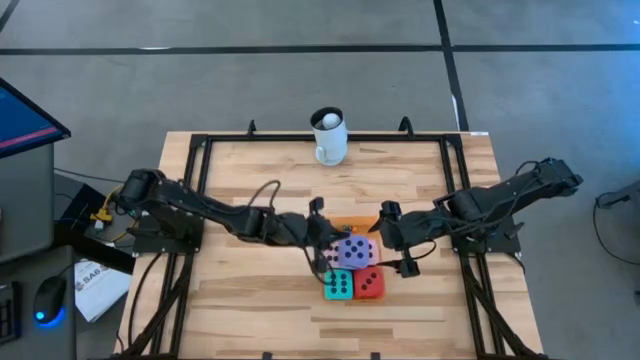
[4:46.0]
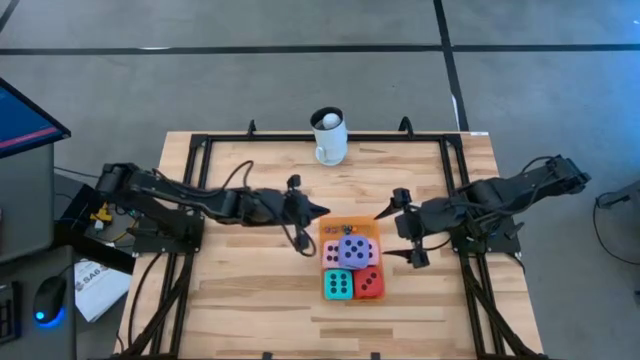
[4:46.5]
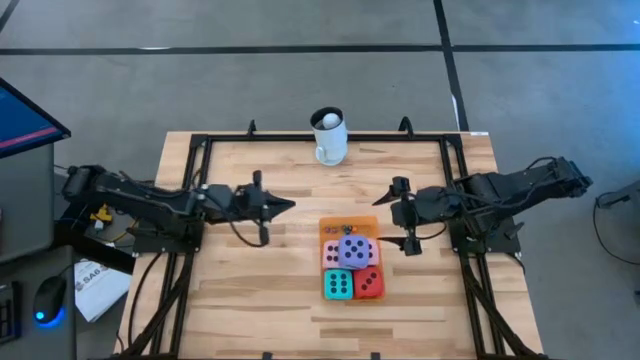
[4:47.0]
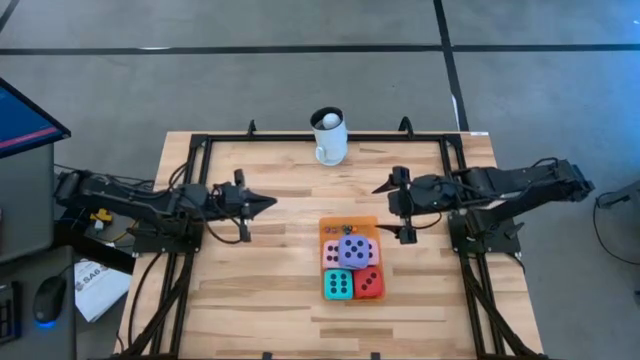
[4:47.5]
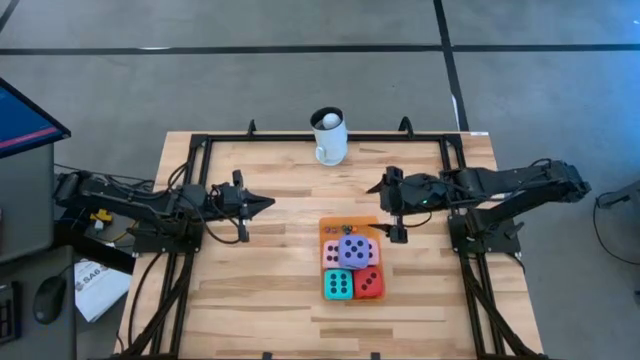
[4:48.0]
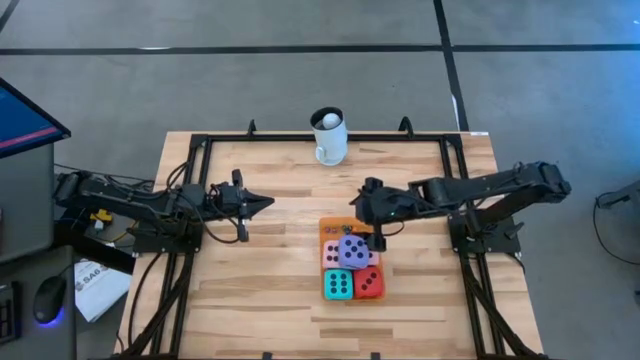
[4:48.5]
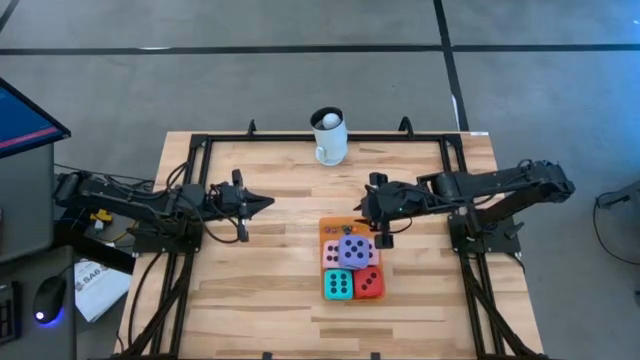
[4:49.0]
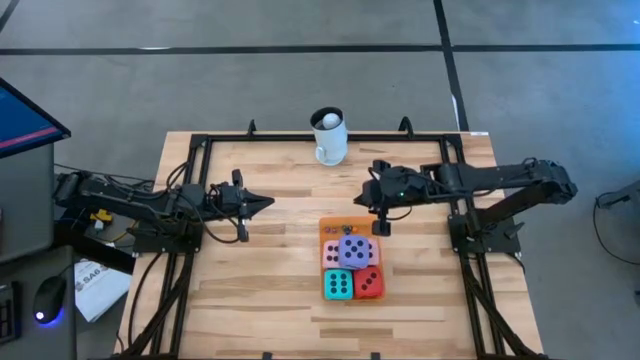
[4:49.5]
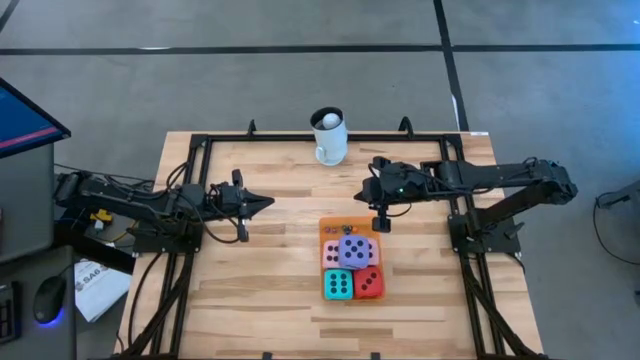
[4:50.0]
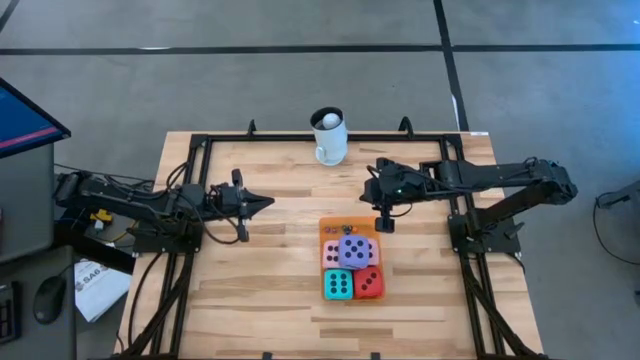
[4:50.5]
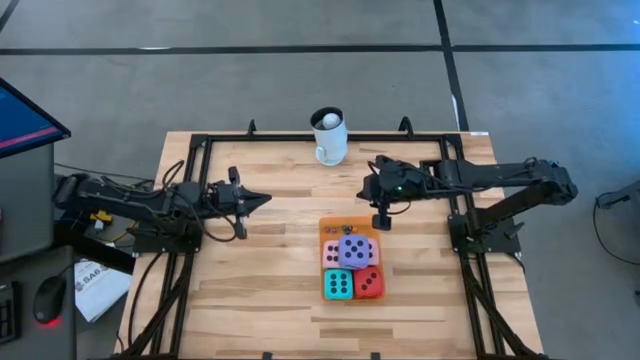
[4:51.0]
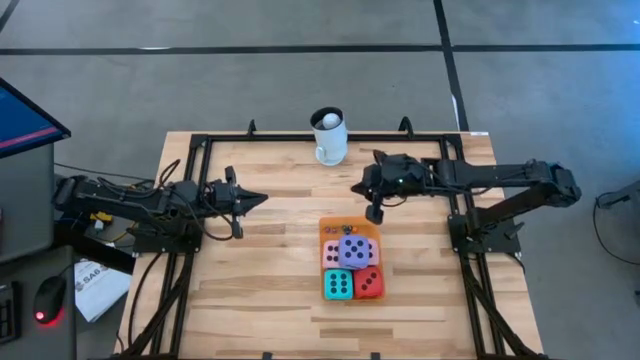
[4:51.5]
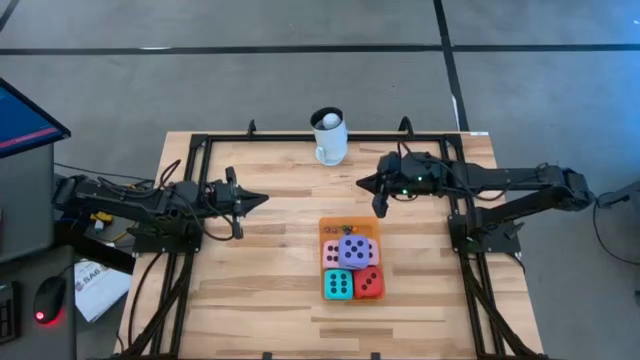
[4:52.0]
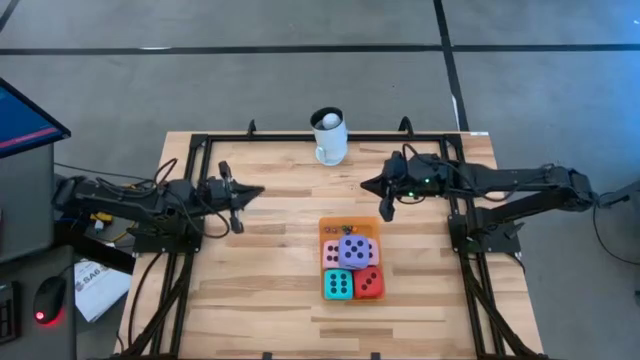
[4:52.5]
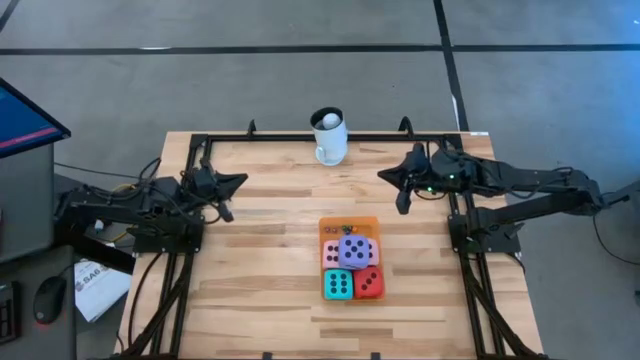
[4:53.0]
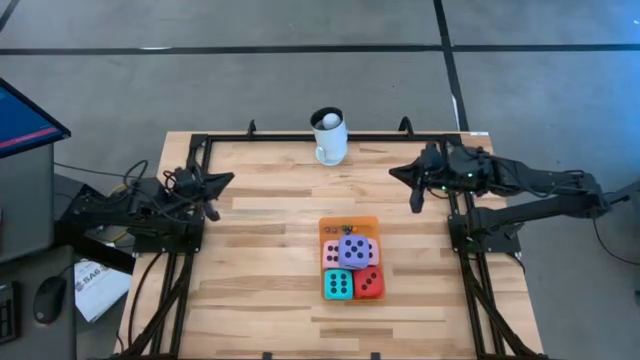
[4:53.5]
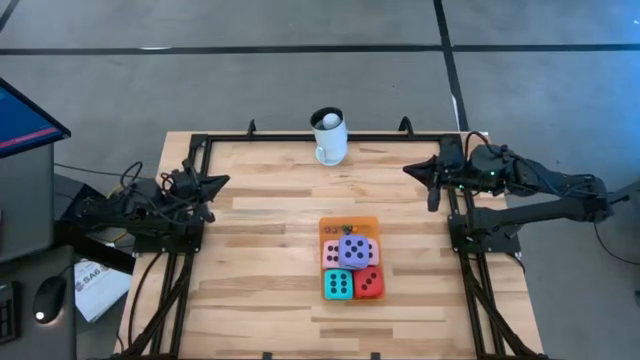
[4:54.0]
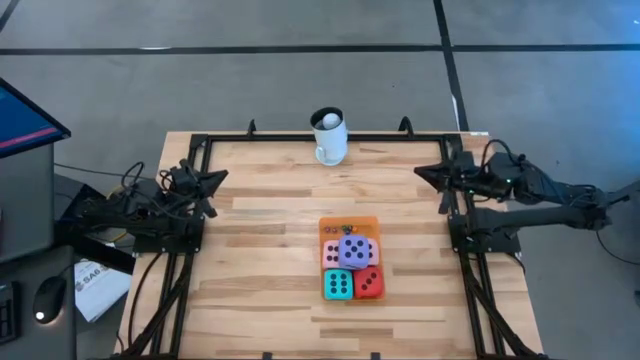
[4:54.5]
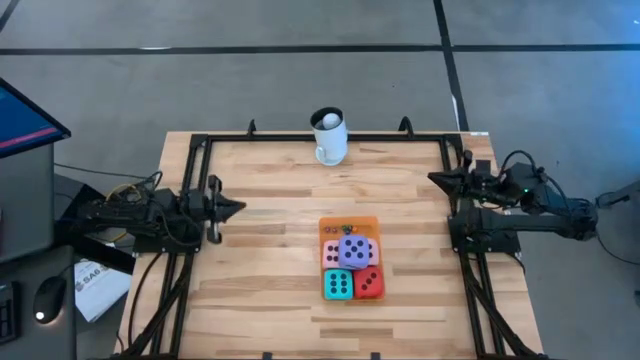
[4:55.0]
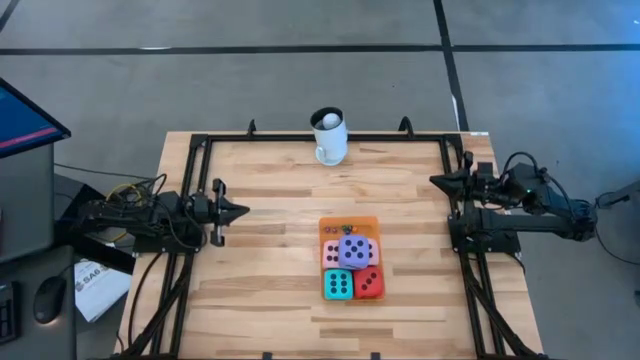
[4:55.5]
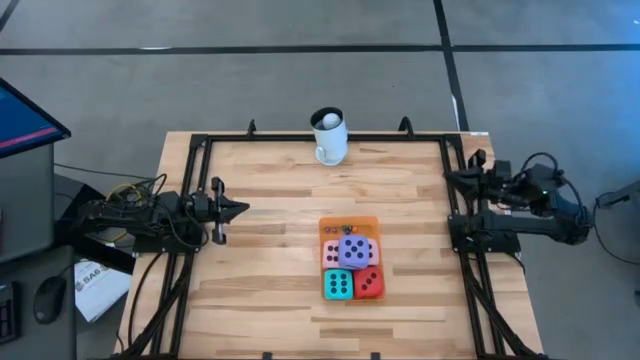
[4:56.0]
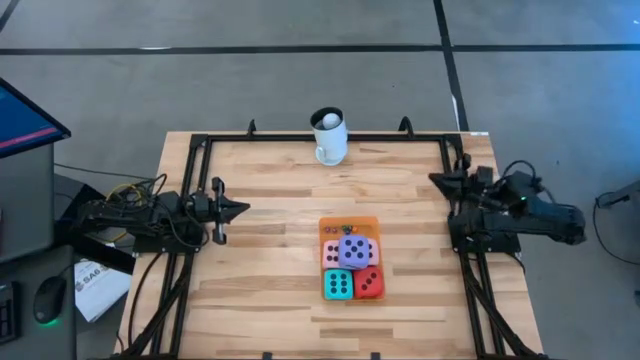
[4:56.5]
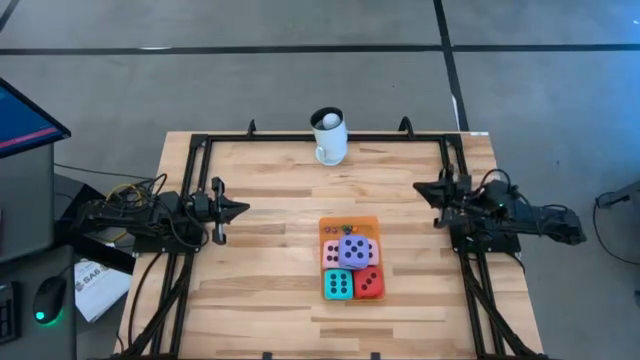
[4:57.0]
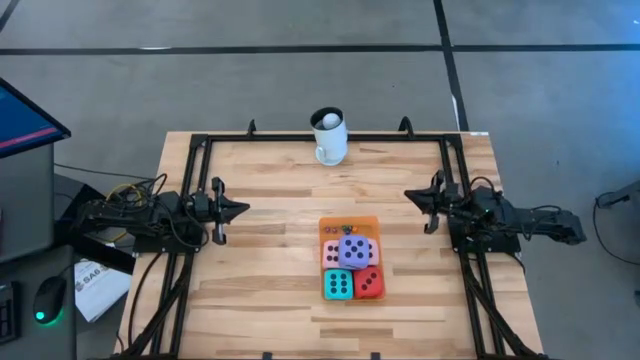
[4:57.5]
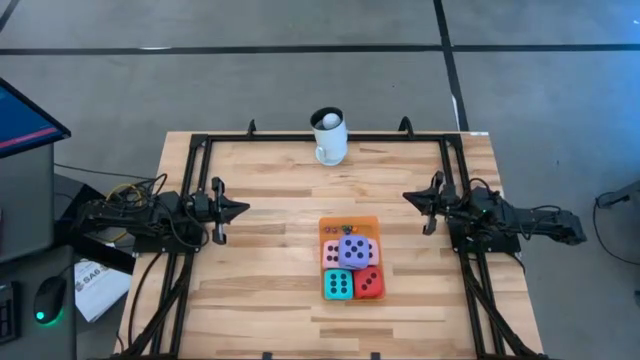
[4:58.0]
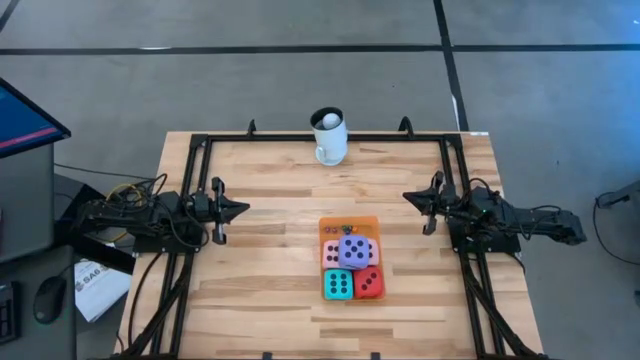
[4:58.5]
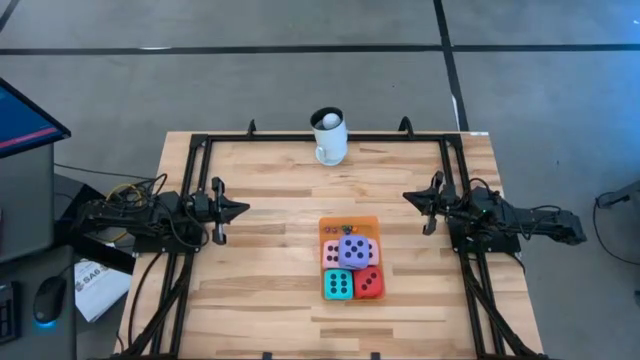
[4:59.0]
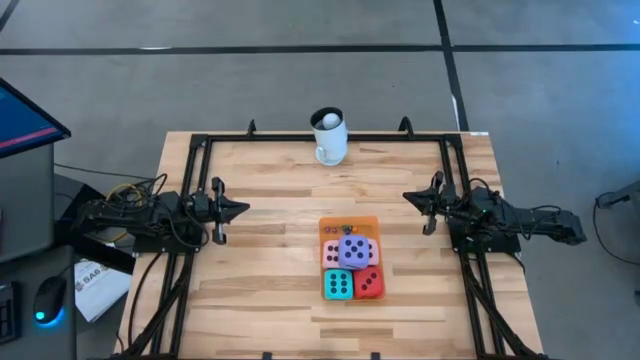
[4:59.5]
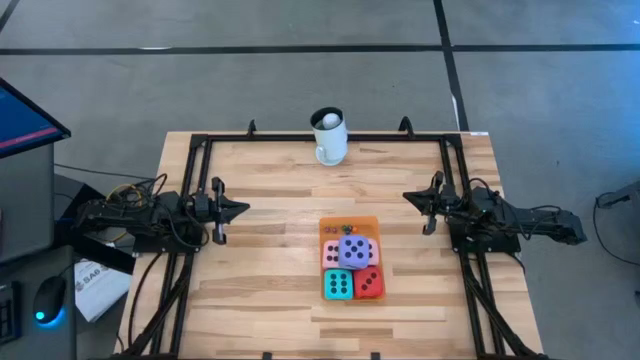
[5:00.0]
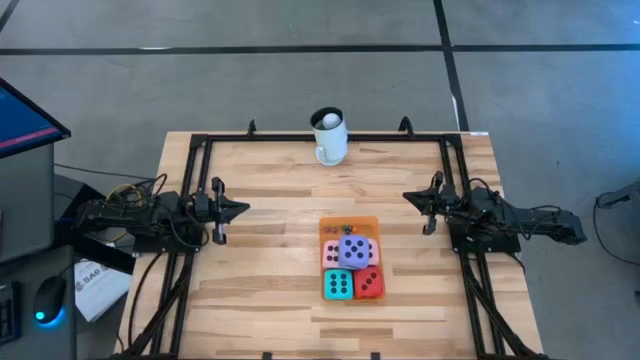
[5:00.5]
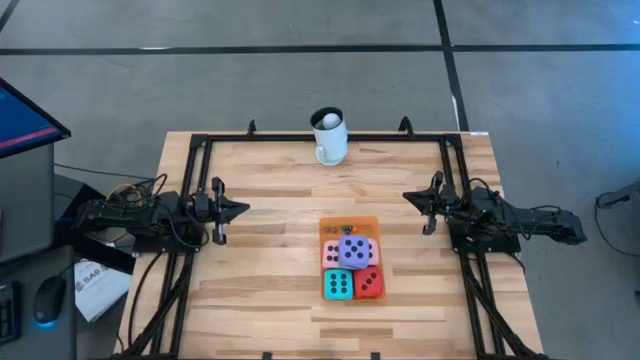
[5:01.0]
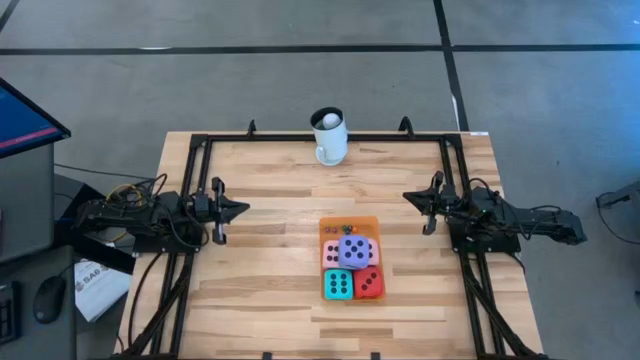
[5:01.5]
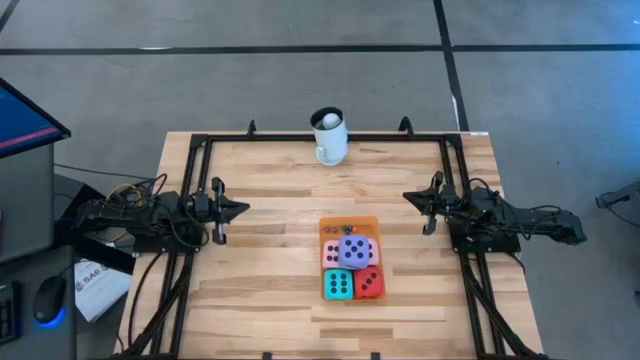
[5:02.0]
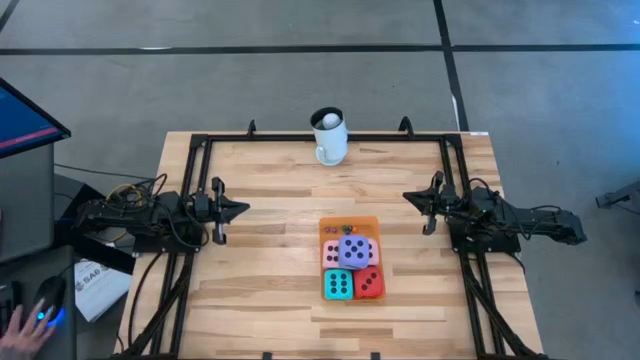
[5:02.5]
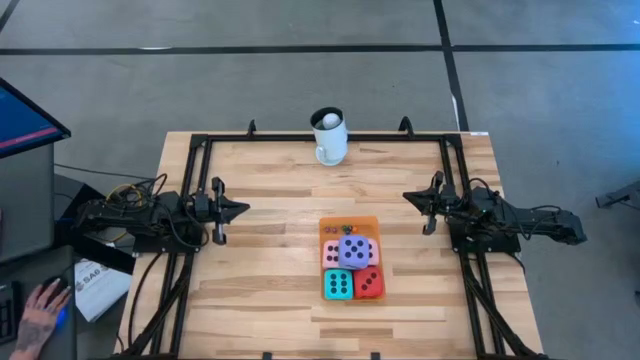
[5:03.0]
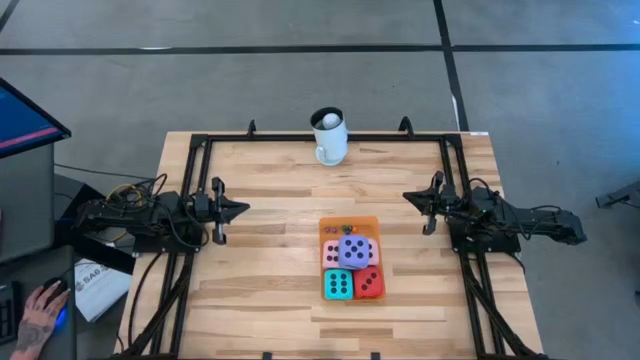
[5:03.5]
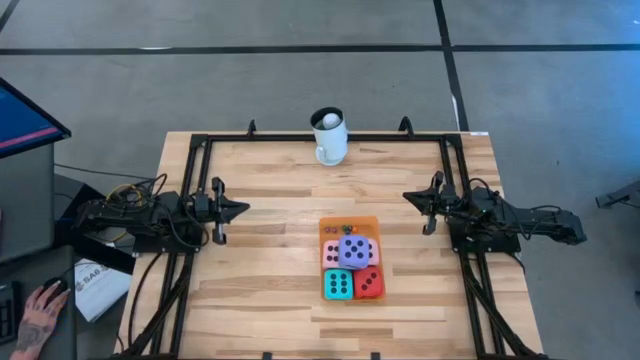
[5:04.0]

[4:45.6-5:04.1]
Task: Pick & Place Dice
Return to Home Position

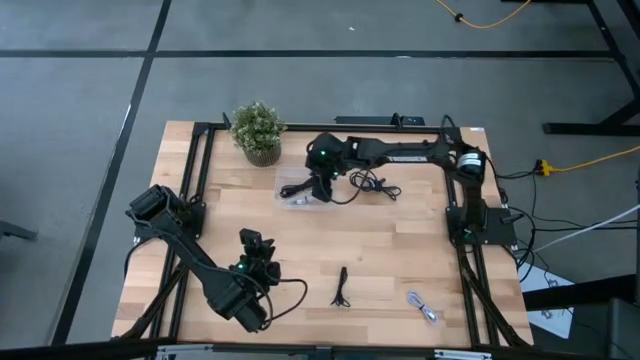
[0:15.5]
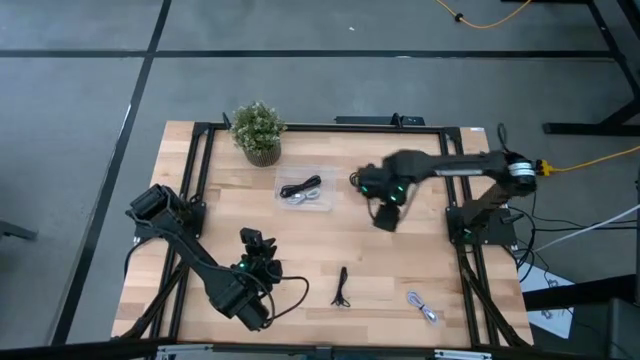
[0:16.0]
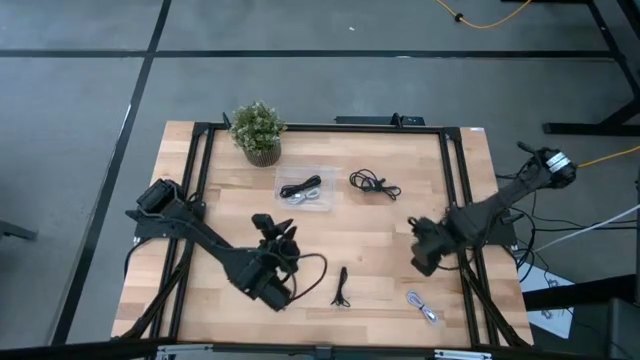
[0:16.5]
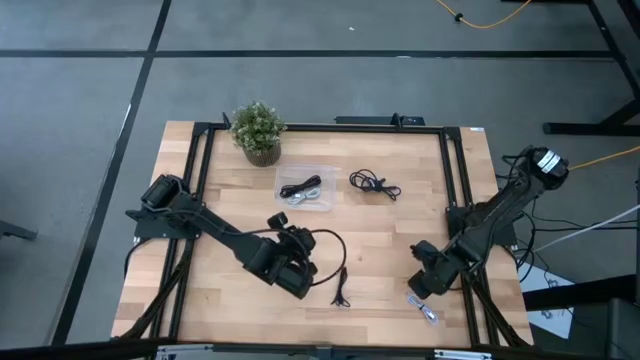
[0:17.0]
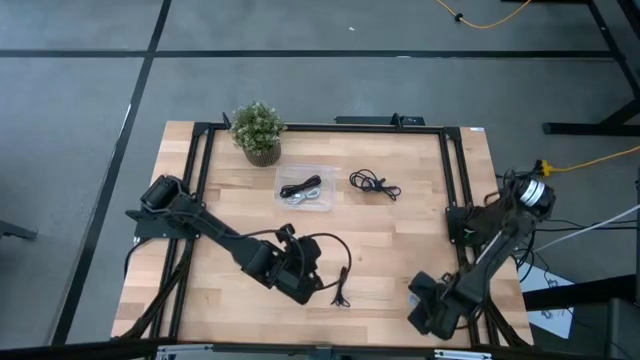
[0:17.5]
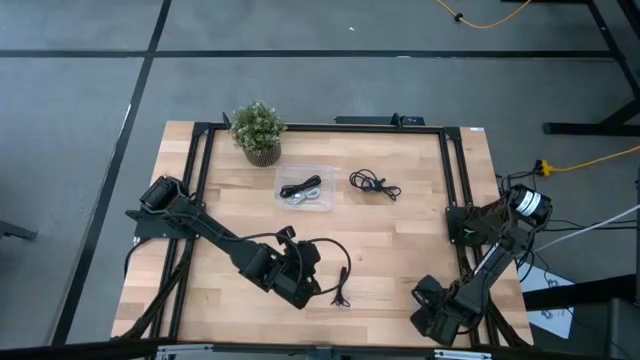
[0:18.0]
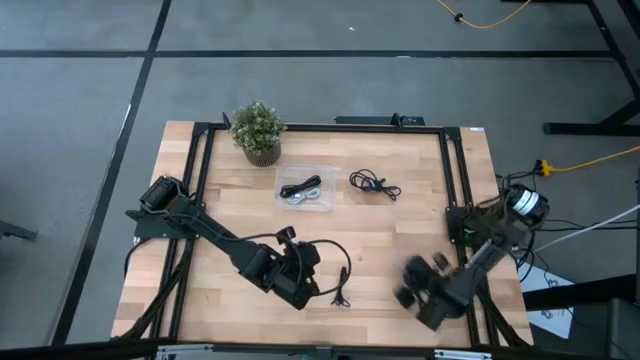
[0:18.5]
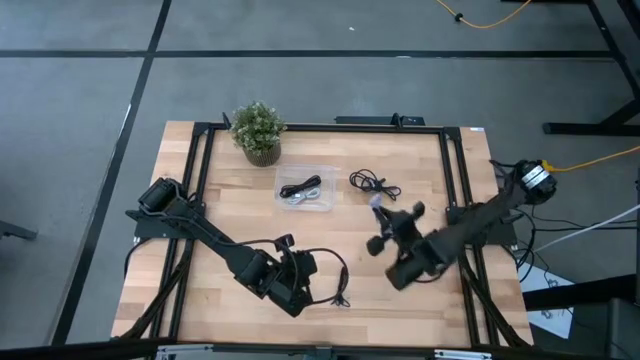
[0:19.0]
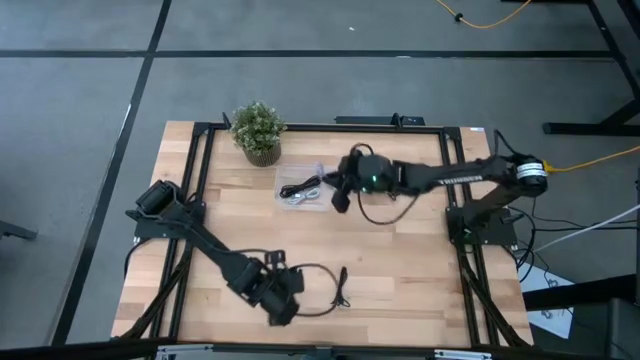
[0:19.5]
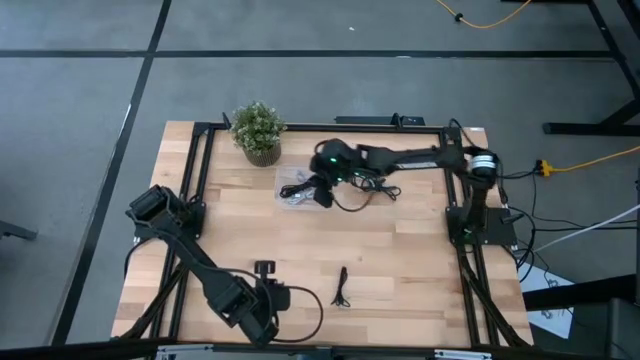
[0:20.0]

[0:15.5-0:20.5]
Task: Pick and place USB-C Cables
Put the white charger cable into the transparent bin
